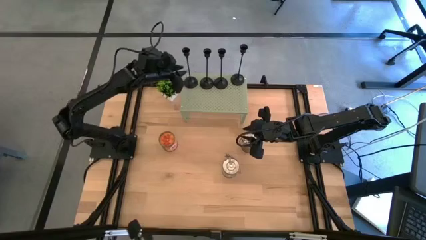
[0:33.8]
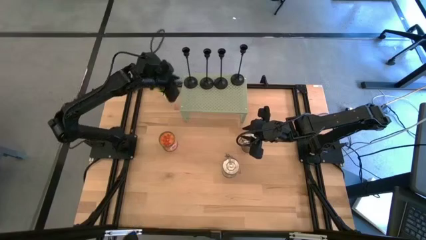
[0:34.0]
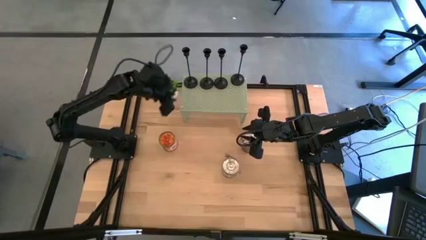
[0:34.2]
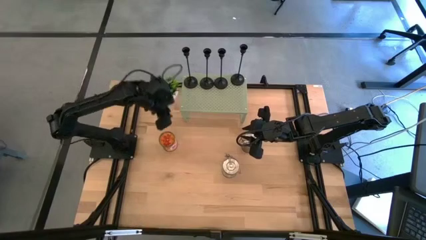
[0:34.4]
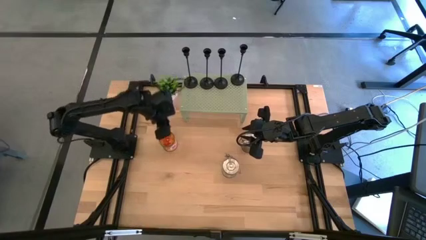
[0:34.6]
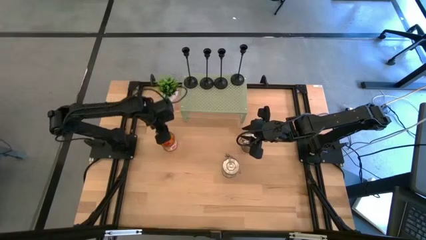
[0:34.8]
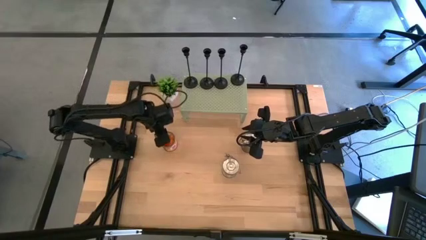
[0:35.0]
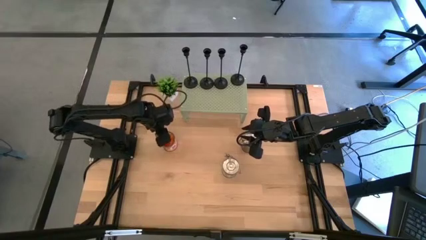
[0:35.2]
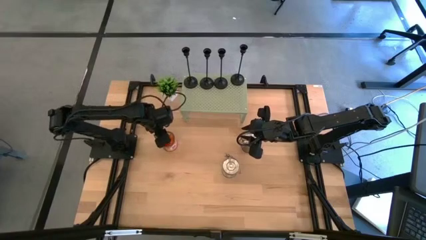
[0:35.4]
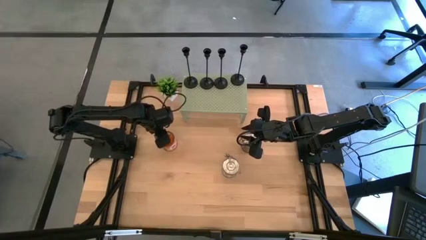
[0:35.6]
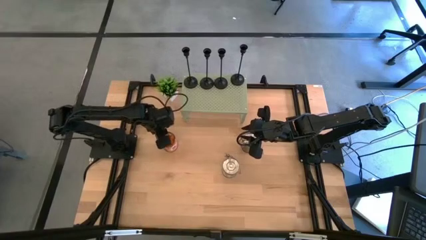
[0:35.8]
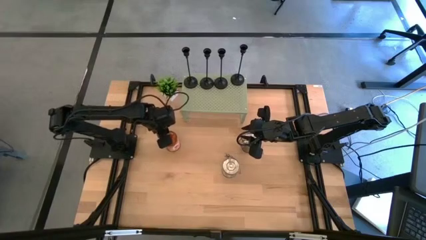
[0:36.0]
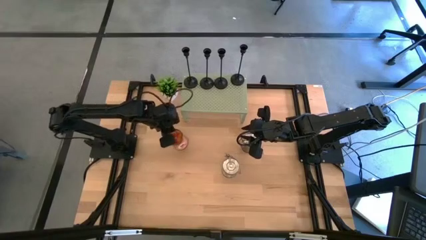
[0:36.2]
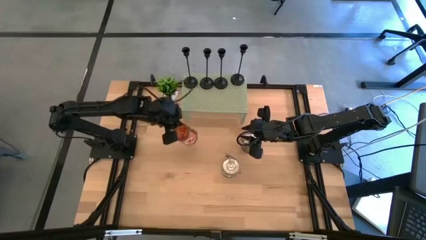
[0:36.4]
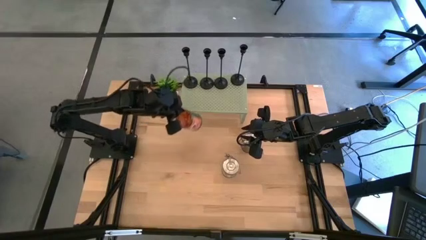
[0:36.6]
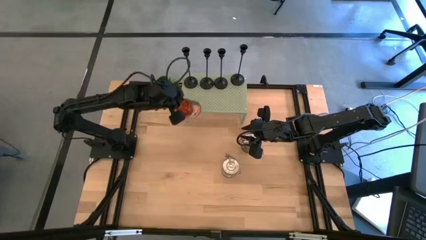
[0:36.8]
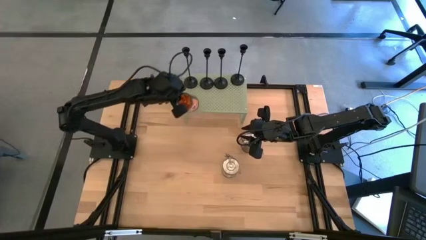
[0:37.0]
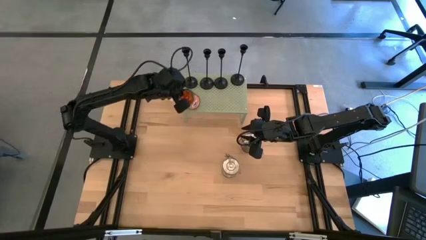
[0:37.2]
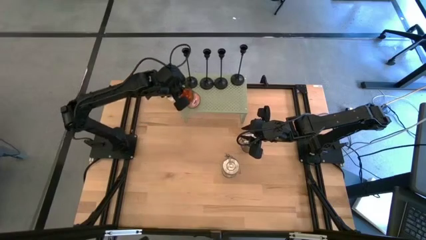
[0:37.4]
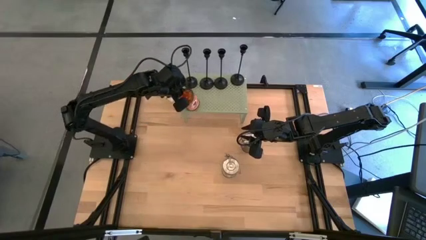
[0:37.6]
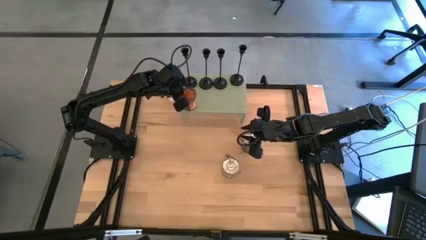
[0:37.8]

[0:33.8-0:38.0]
Task: Pick & Place candle stick holders
Put the orange scented candle on the shelf

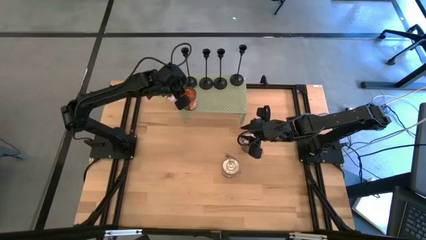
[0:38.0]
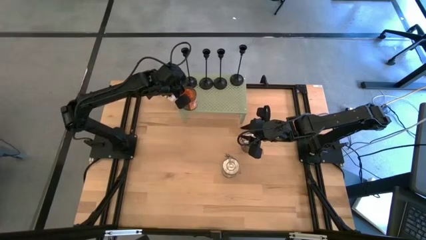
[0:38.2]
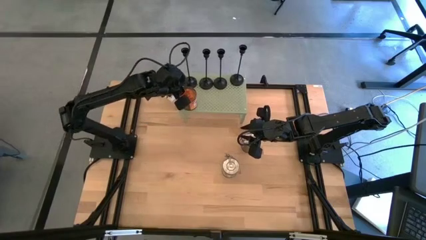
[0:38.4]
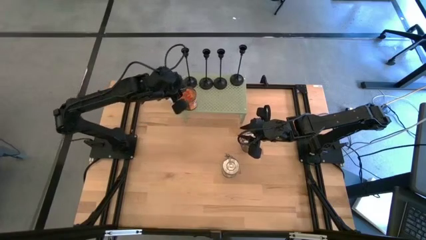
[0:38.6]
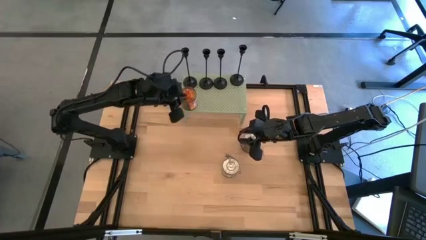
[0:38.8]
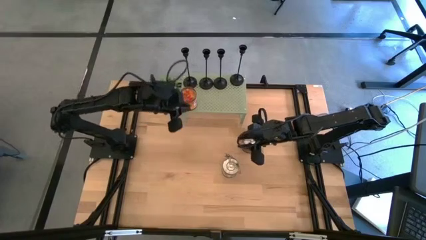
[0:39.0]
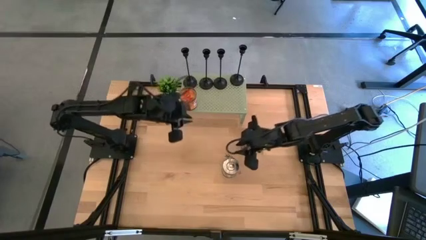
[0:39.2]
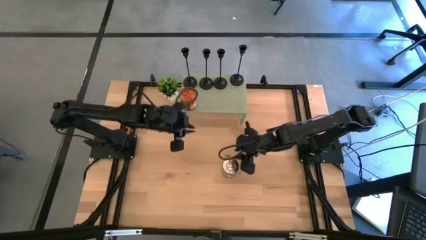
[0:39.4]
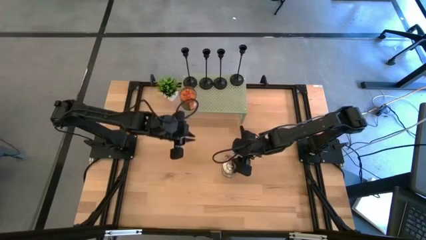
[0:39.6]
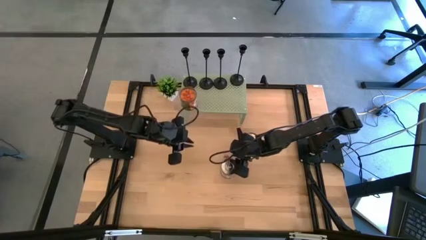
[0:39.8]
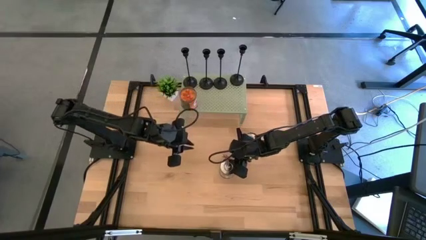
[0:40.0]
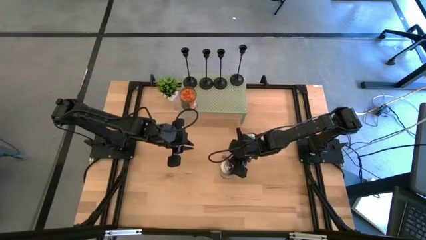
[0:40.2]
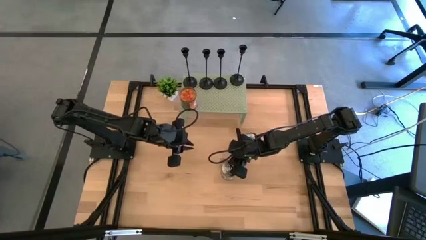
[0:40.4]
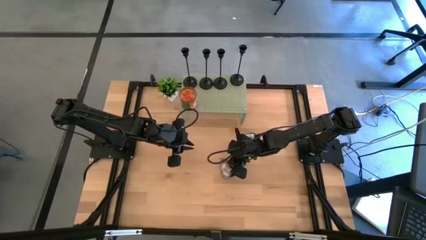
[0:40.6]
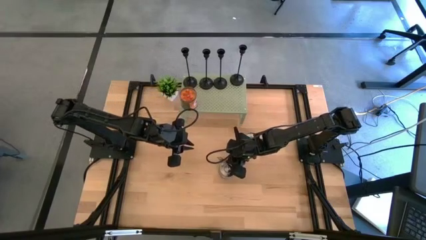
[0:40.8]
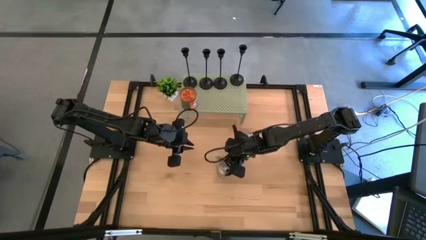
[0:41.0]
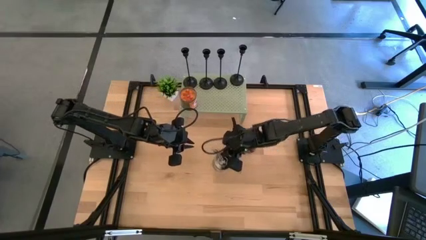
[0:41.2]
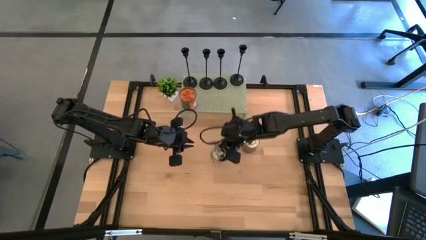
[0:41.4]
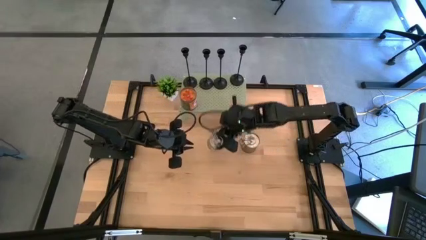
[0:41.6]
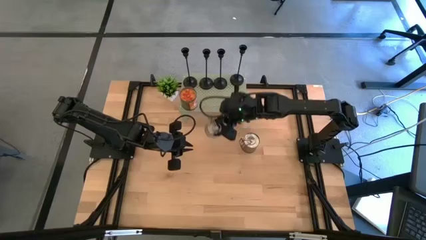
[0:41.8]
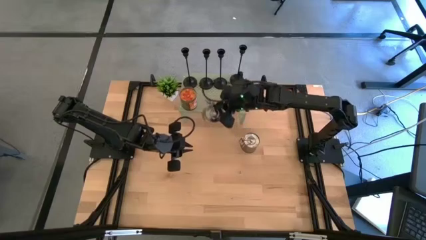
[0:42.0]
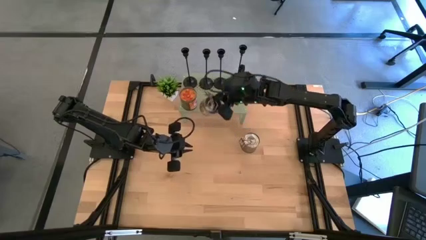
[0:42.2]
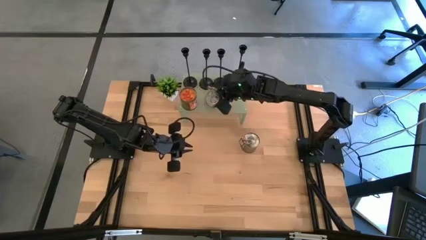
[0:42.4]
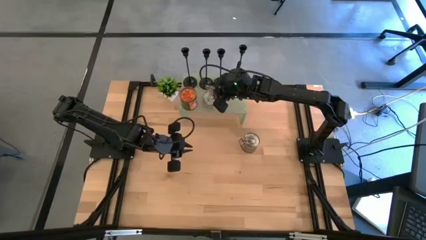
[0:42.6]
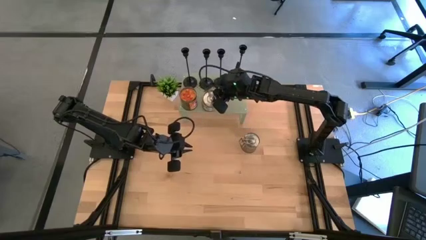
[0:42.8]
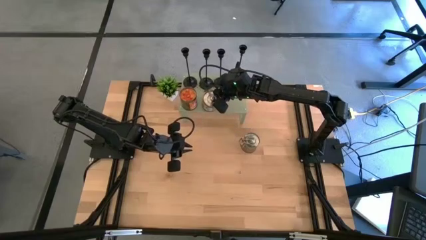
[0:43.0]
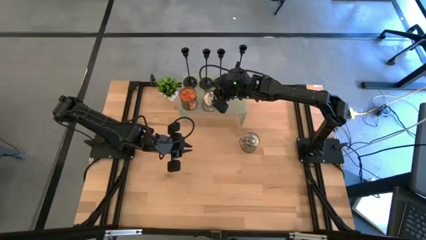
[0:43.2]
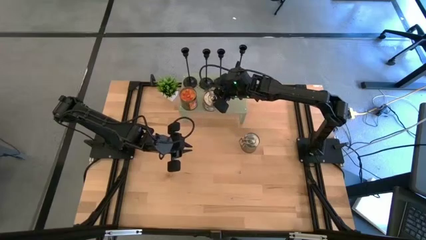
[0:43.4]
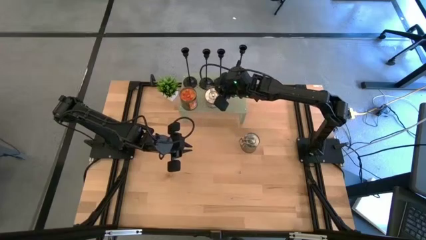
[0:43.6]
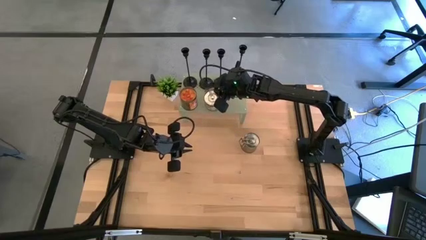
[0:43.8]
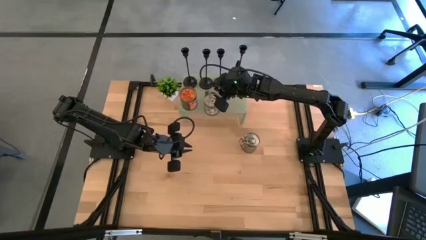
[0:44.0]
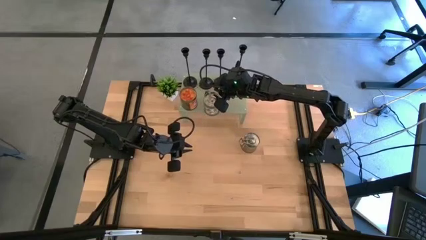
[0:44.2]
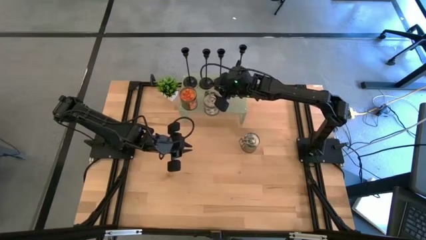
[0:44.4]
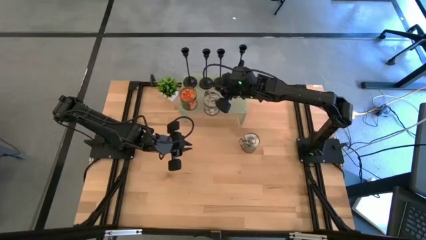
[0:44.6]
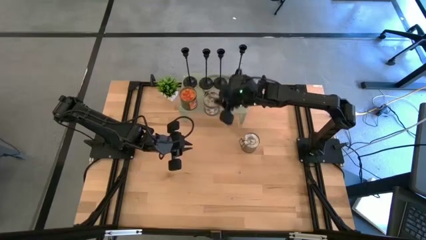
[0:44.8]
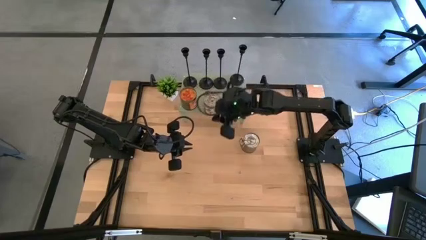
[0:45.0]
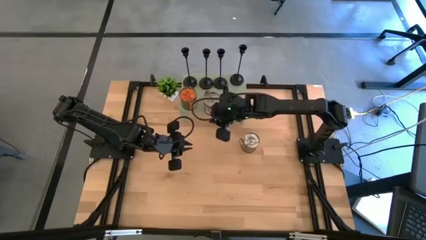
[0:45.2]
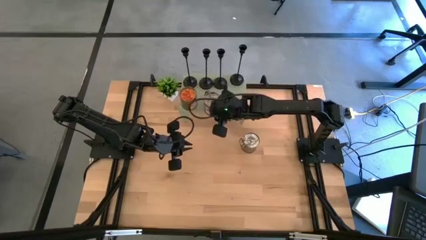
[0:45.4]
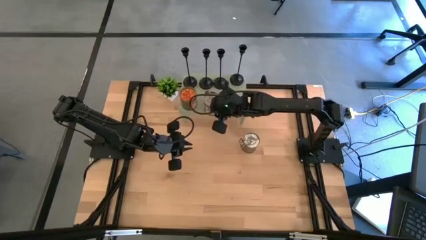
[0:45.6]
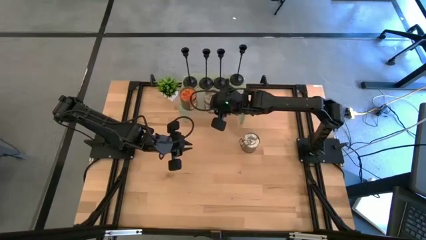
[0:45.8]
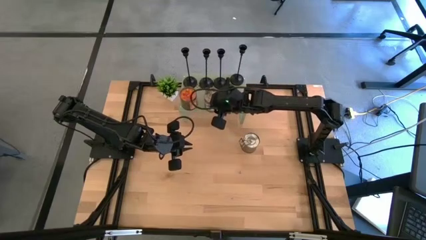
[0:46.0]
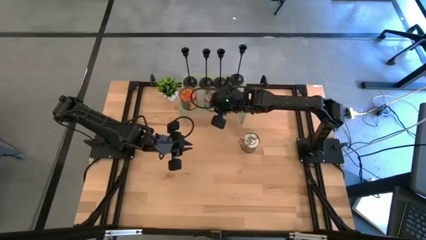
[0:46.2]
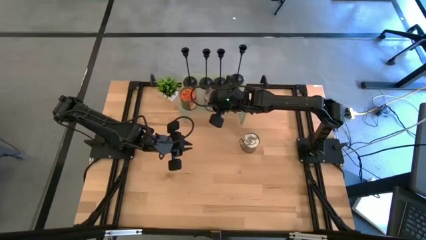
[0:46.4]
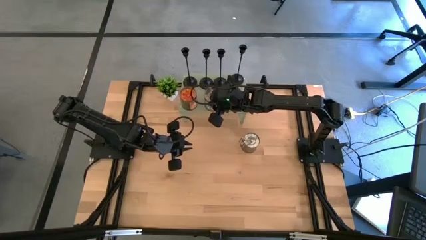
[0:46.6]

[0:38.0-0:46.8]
Put the brown scented candle on the shelf aligned with the orange scented candle

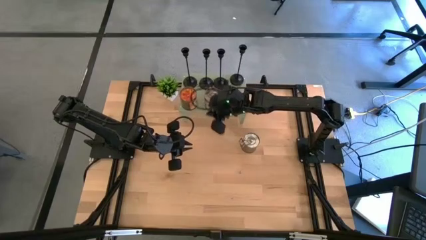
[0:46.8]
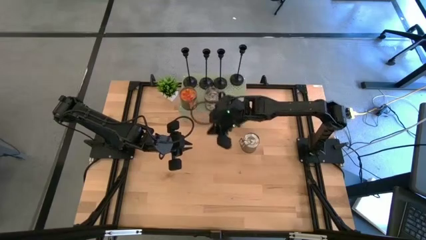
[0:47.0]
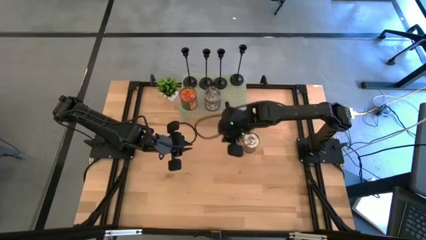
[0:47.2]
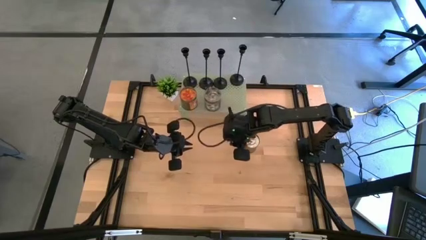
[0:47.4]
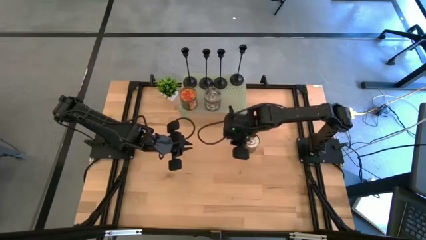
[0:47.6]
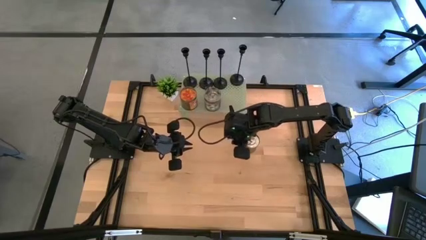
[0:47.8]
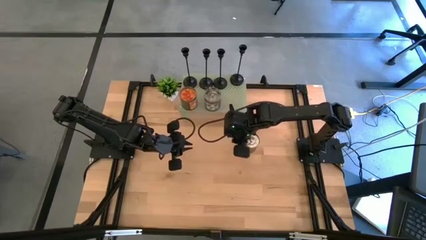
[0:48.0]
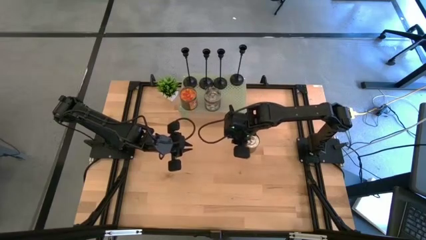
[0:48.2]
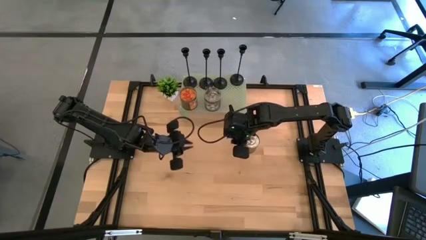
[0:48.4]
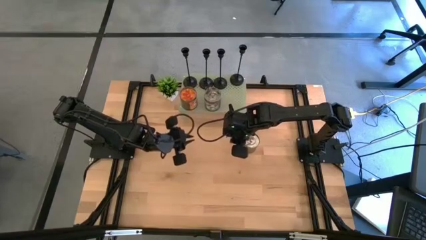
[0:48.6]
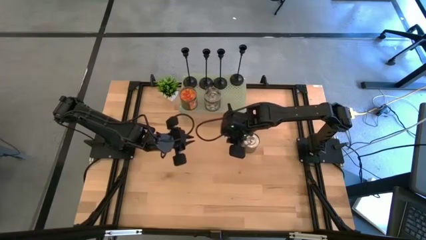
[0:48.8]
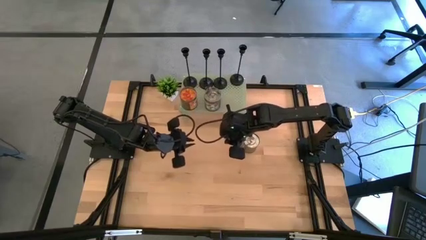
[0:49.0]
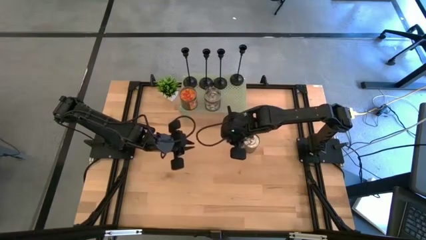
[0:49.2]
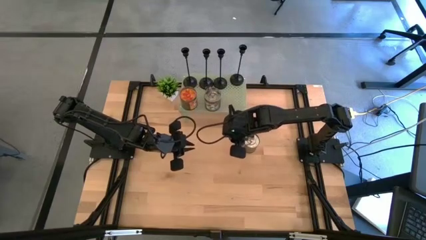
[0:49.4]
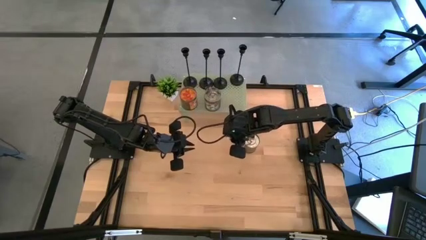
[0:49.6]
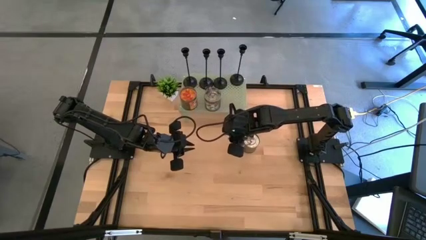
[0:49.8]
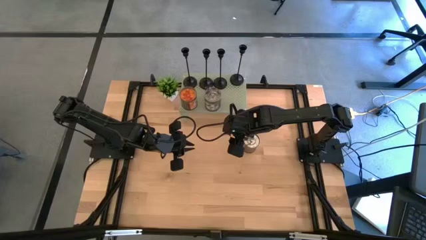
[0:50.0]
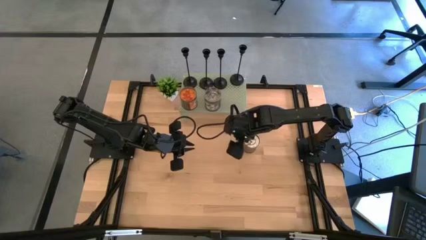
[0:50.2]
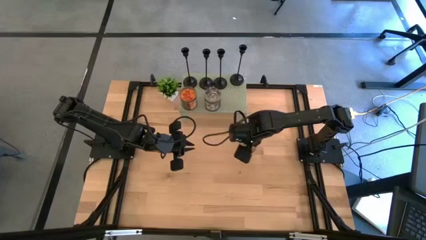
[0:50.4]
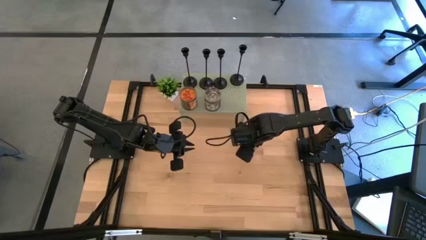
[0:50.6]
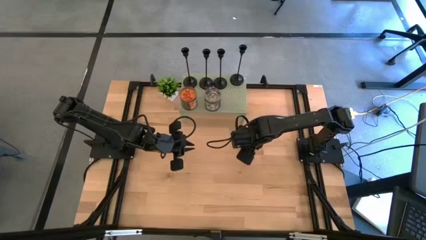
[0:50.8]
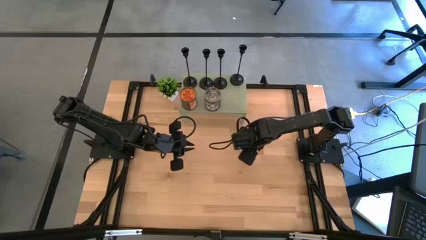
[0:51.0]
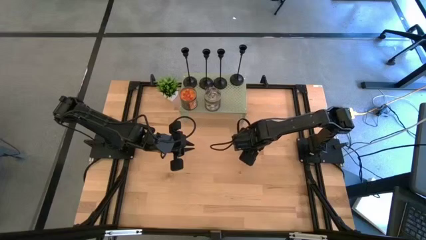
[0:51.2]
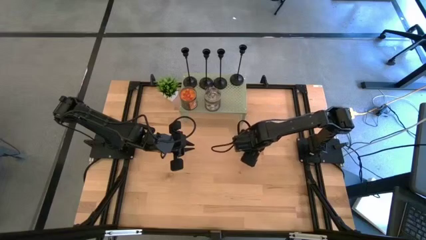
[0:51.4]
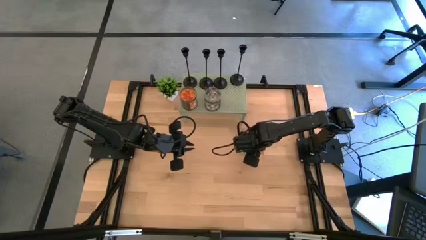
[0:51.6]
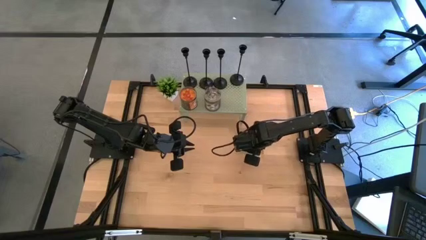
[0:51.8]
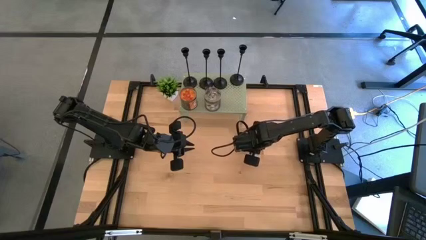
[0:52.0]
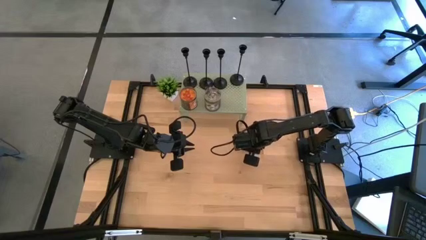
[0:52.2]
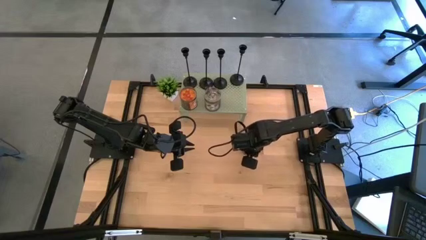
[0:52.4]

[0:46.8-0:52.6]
Put the brown scented candle on the shelf aligned with the other brown scented candle
